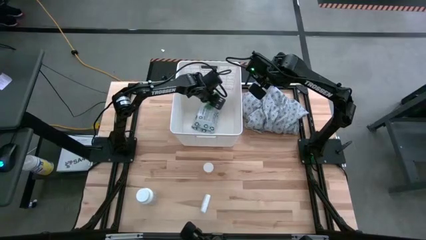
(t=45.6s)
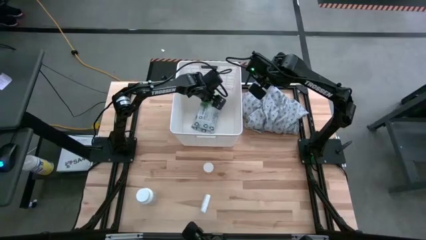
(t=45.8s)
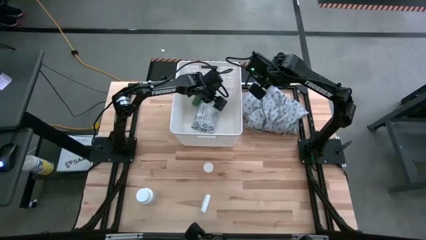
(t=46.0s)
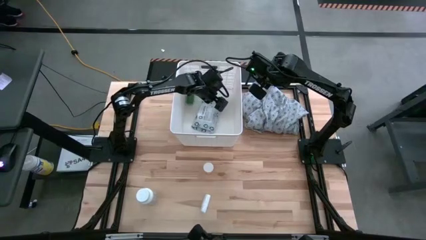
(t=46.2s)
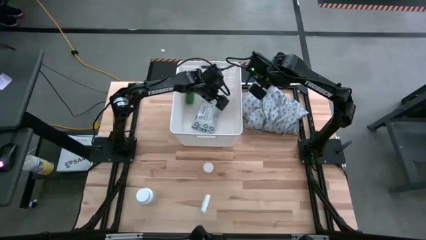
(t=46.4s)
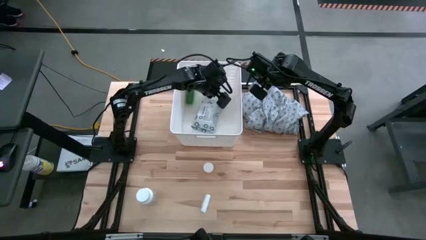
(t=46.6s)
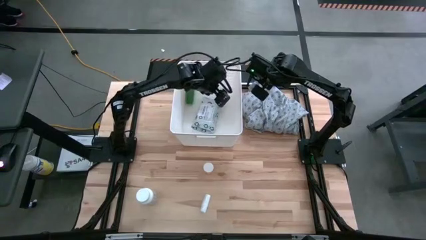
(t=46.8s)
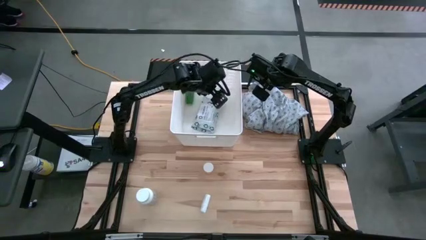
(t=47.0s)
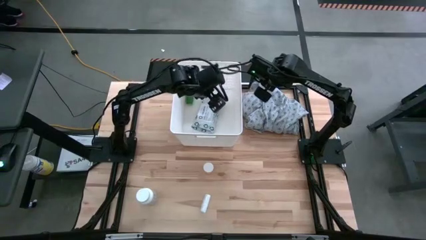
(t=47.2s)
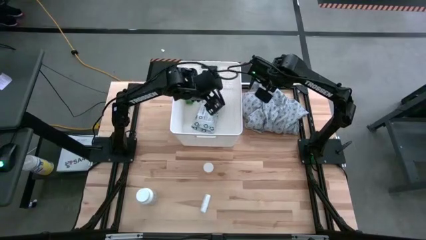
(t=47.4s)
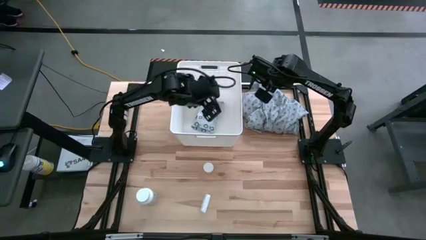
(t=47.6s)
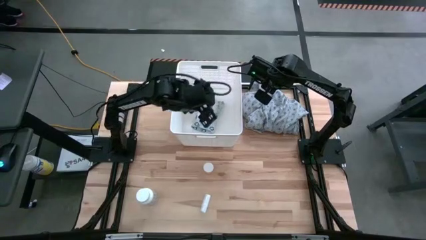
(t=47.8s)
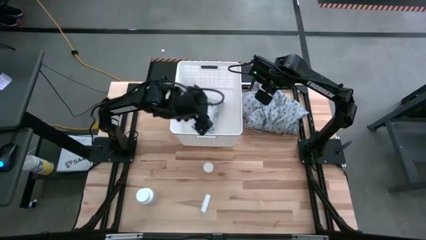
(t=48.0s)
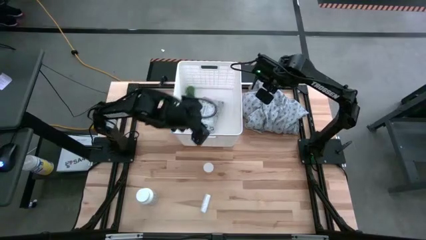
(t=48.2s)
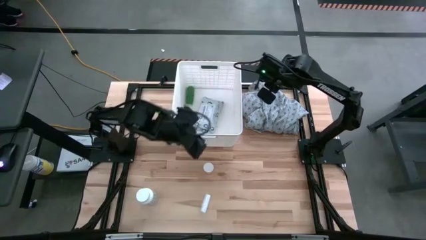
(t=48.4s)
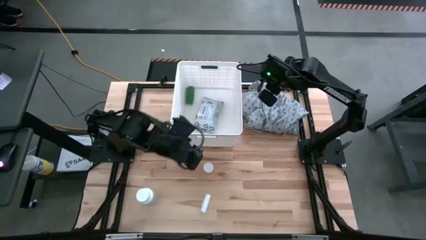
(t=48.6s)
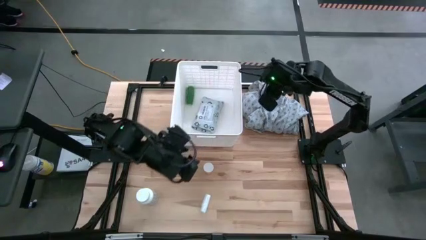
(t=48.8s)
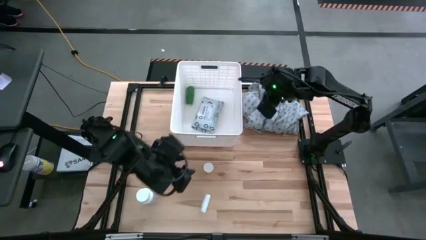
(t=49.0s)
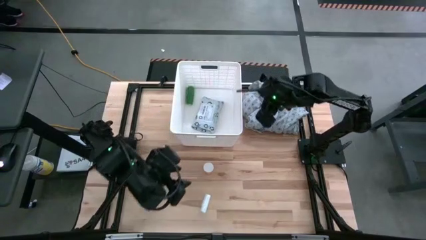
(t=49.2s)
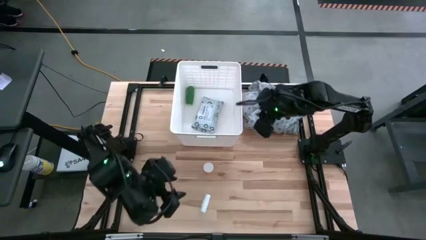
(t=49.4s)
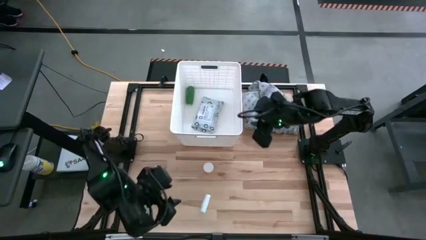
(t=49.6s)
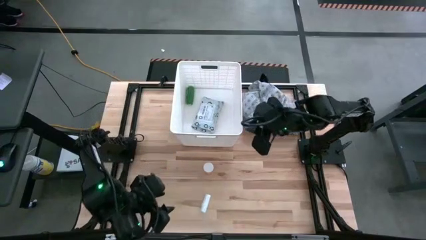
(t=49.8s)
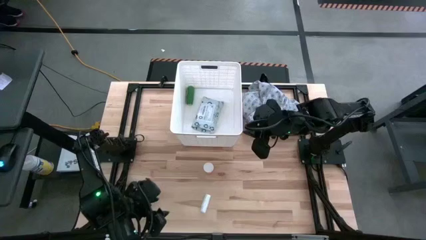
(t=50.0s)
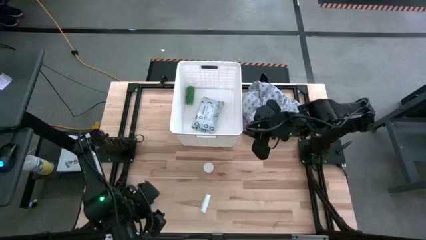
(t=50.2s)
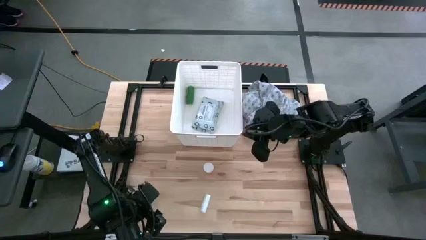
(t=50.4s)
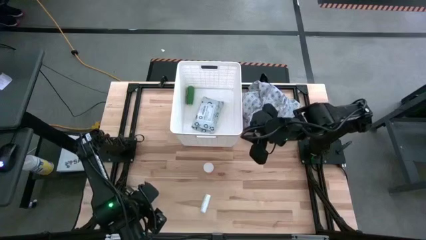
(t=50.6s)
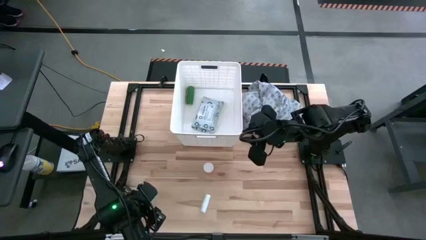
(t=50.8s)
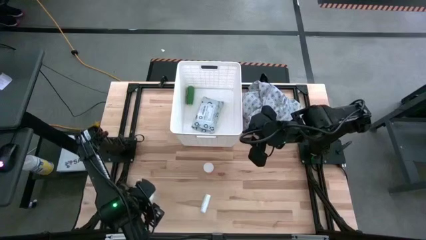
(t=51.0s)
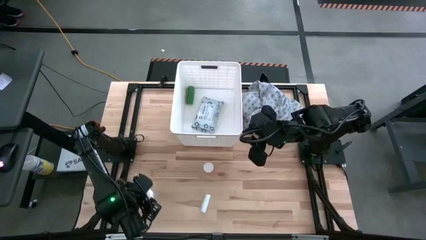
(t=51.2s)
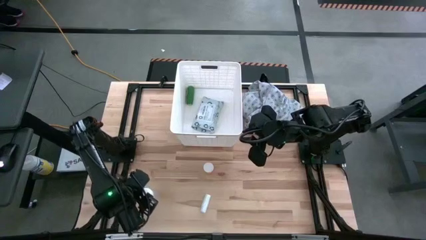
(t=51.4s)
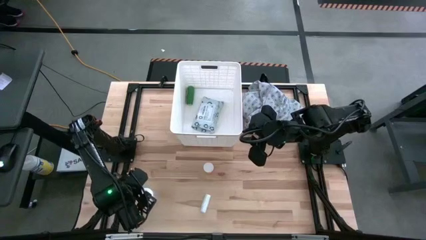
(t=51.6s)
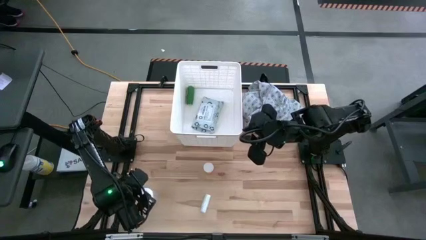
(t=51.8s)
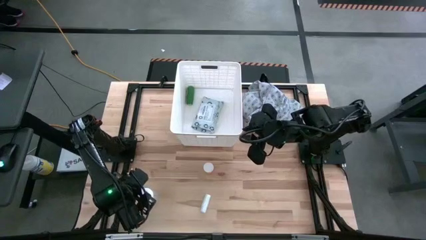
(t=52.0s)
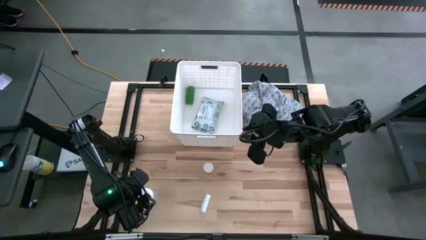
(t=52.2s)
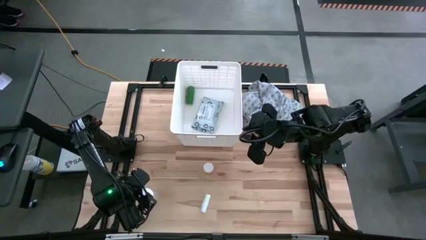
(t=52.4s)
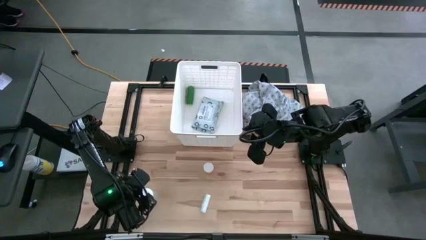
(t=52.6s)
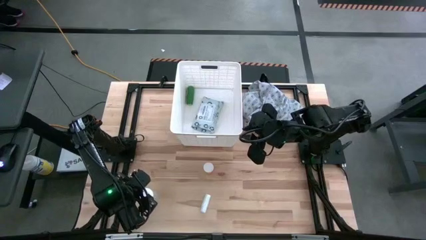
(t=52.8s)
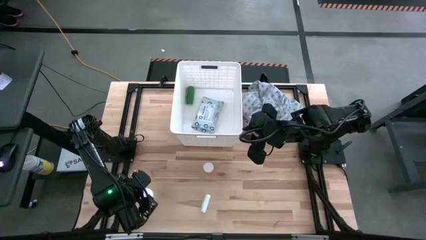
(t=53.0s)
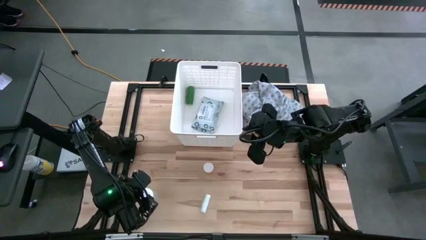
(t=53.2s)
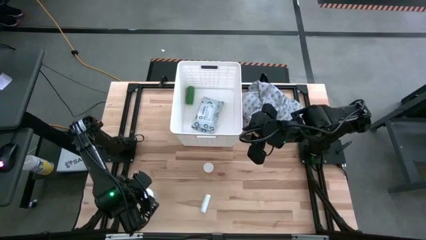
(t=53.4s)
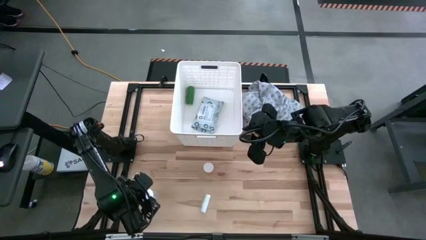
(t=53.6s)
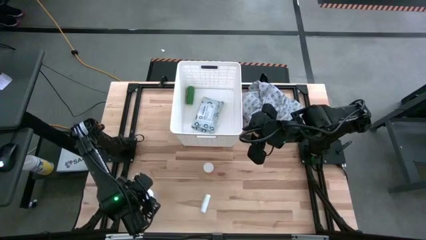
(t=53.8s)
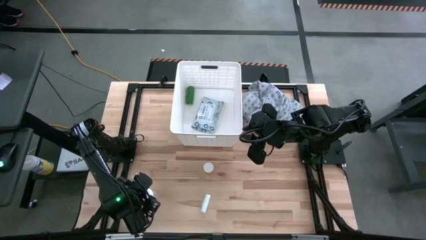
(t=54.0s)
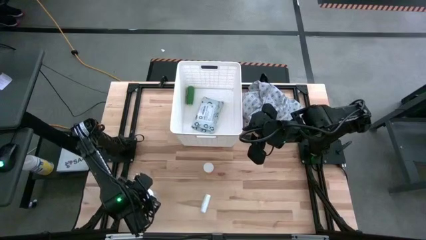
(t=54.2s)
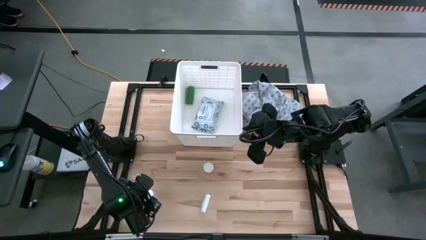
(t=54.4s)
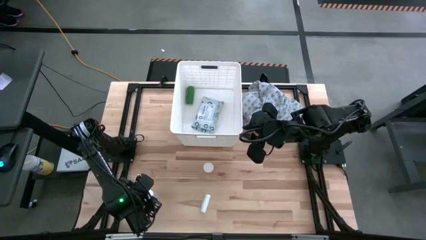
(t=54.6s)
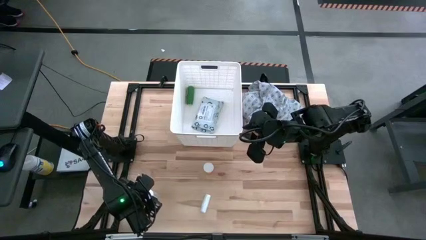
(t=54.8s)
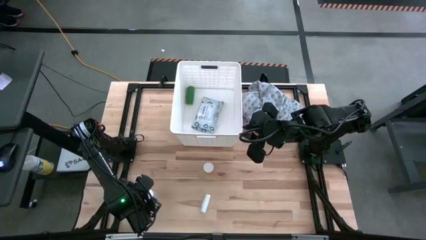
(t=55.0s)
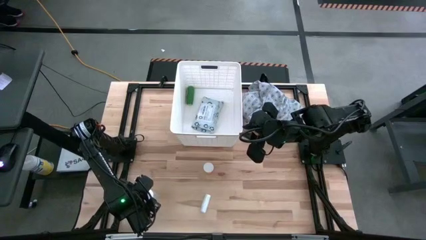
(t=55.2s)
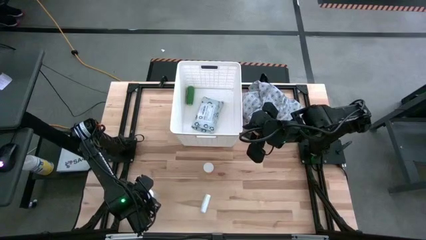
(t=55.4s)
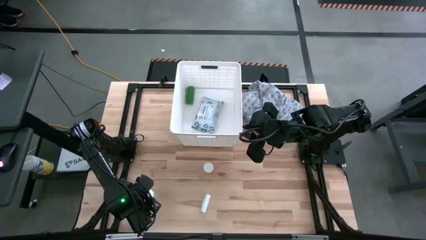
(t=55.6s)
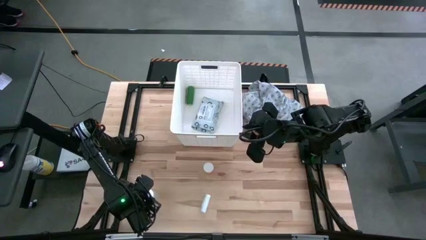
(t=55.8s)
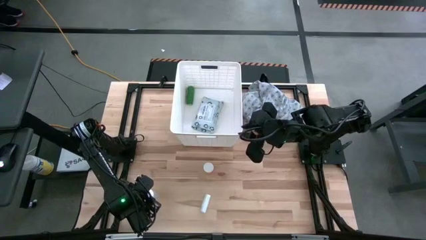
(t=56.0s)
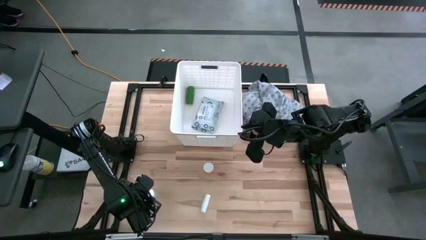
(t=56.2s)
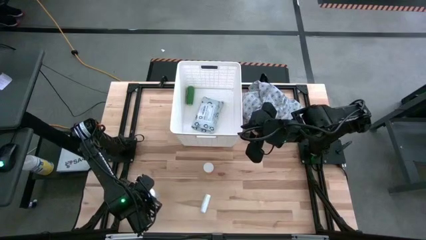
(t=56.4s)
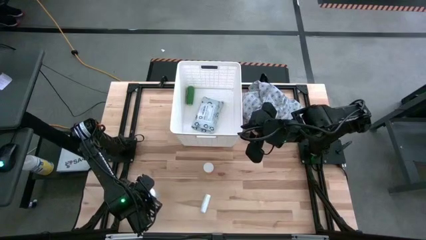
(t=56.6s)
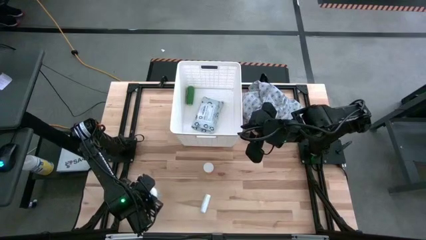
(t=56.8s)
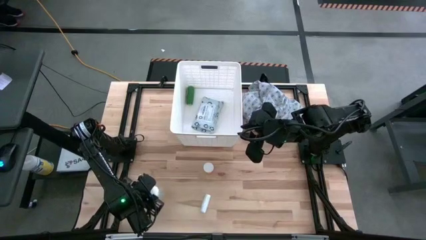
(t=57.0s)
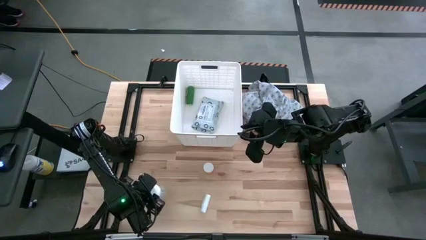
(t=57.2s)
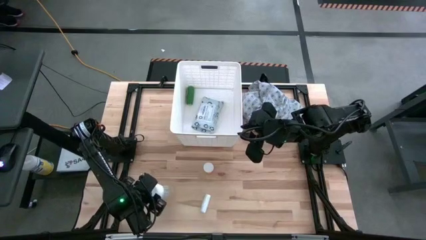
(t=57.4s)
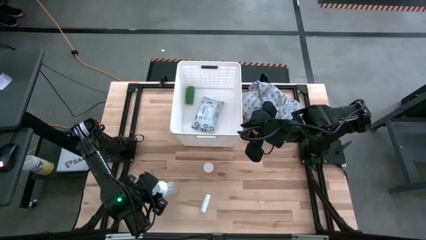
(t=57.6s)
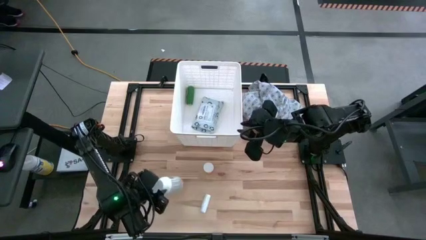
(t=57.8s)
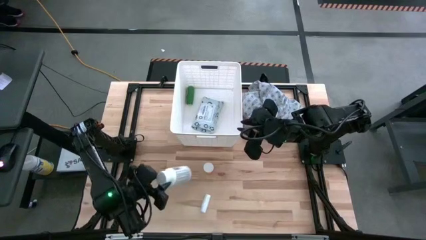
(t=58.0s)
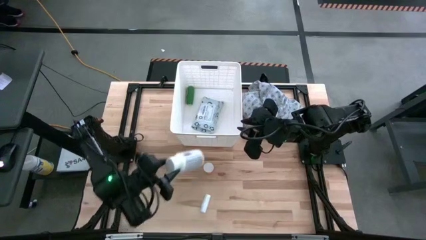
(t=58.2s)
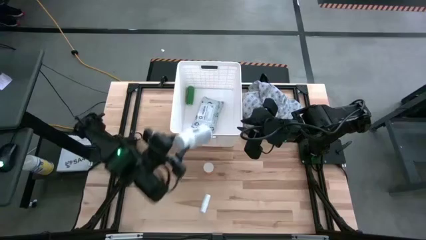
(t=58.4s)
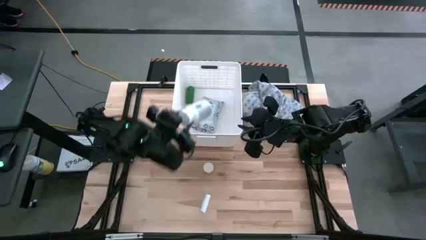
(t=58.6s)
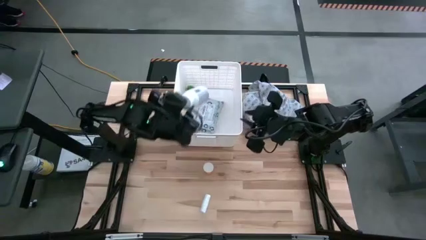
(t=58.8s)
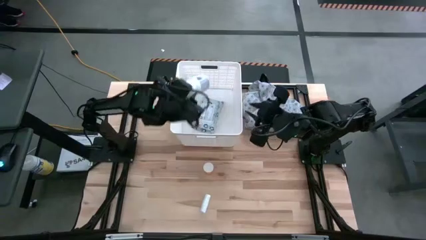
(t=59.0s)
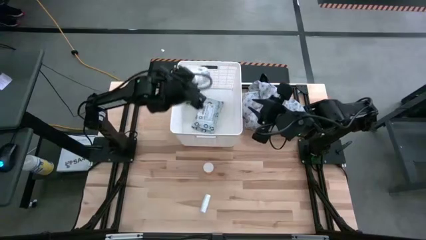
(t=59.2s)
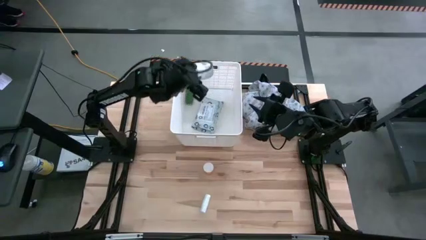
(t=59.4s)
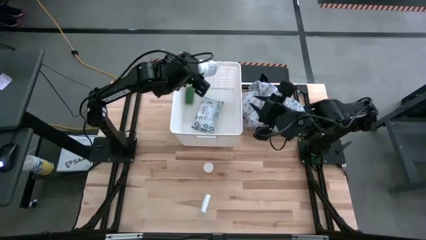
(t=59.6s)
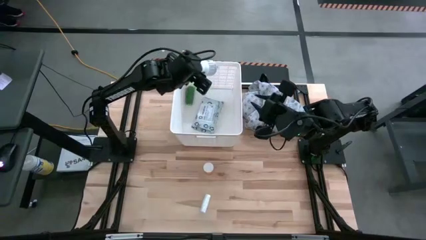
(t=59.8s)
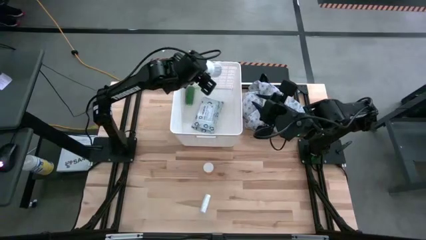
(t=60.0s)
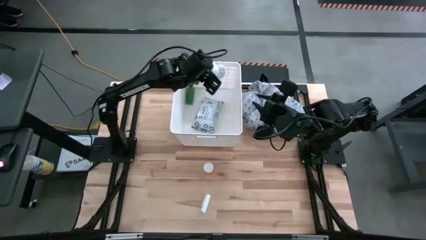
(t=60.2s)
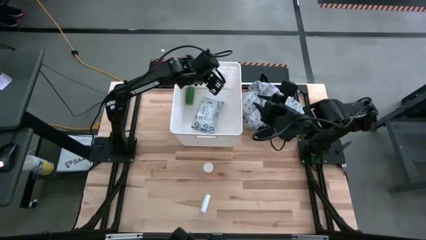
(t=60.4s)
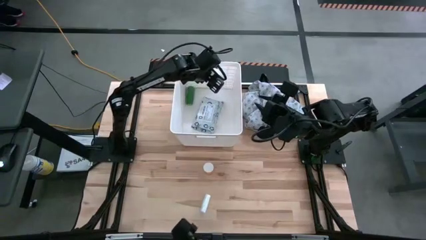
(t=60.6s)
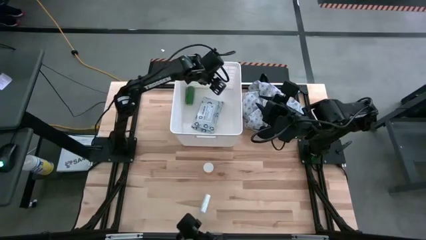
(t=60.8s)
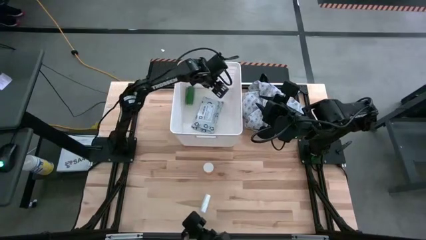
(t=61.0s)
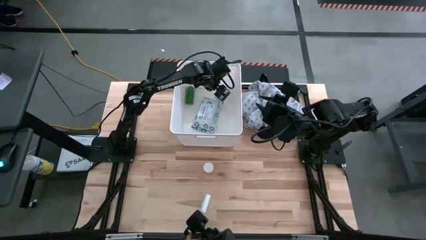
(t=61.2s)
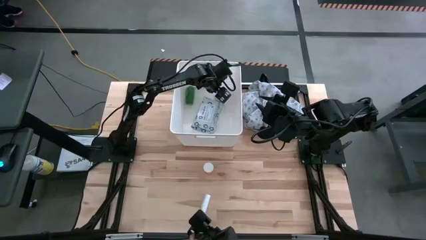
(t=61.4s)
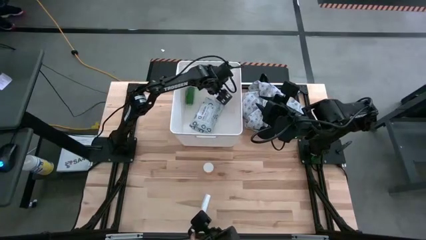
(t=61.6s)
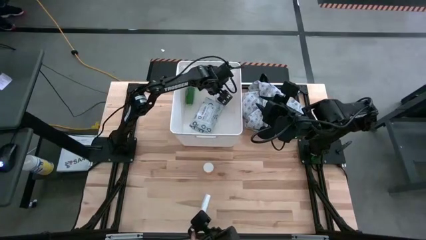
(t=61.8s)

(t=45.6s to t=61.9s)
Task: Pick & place medical supplies in basket/bin
Put the white pill bottle into the white laundry organizer
